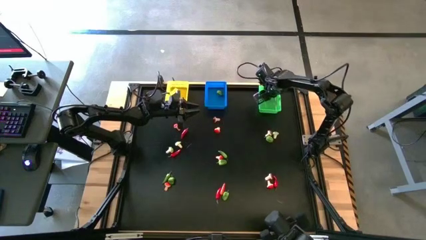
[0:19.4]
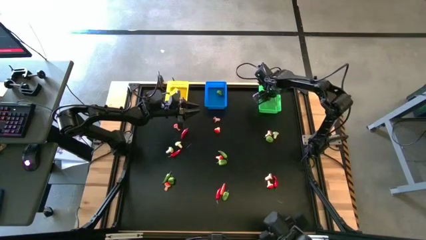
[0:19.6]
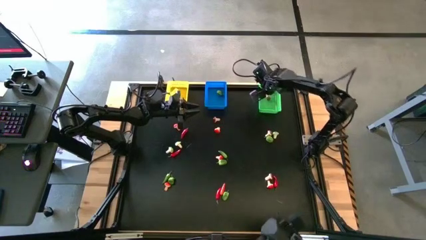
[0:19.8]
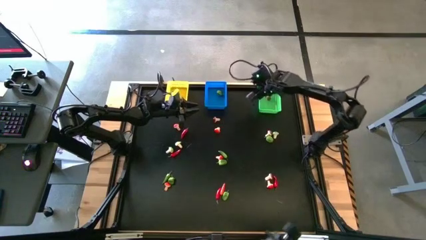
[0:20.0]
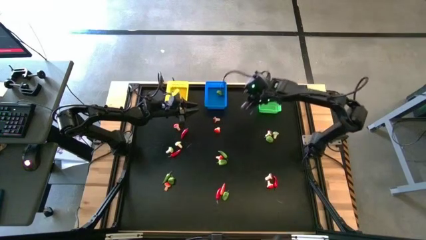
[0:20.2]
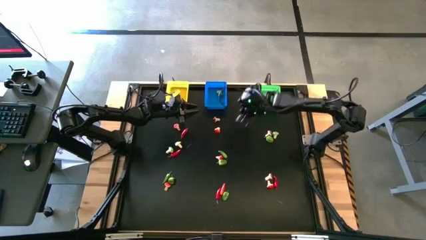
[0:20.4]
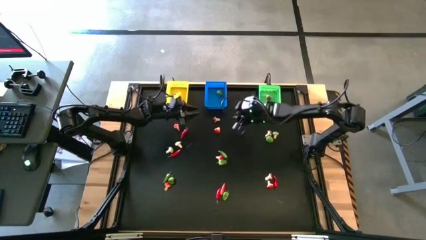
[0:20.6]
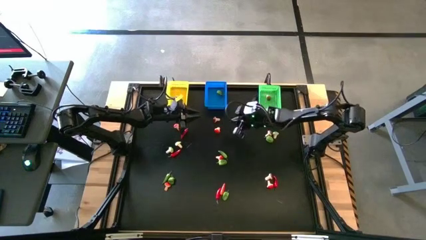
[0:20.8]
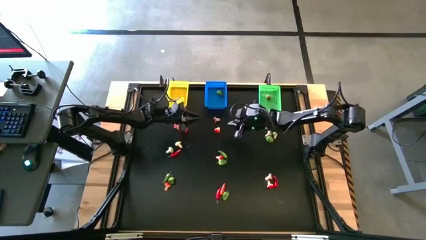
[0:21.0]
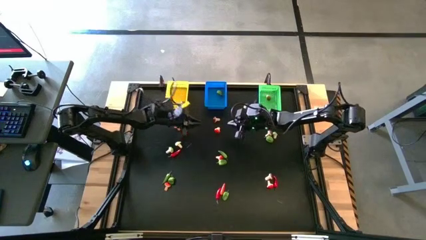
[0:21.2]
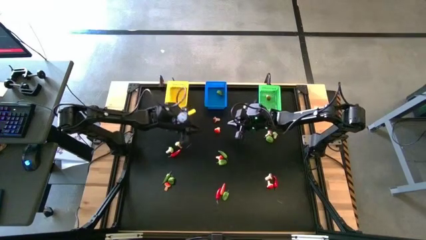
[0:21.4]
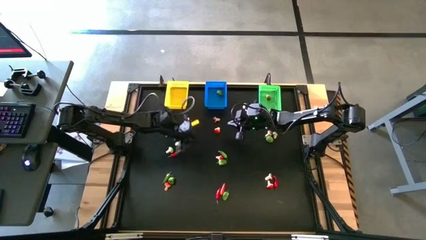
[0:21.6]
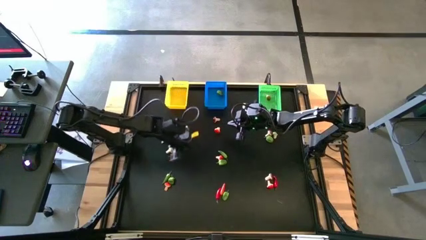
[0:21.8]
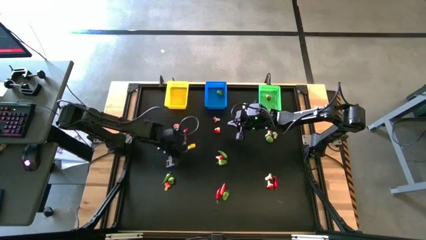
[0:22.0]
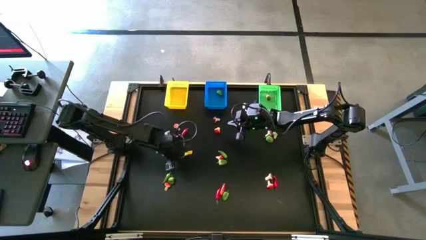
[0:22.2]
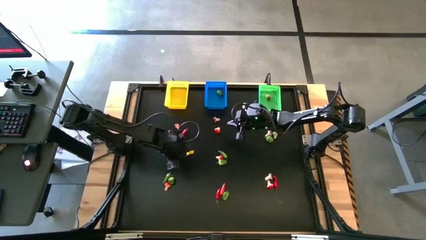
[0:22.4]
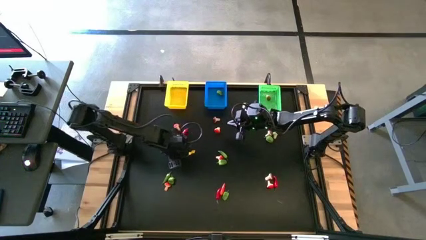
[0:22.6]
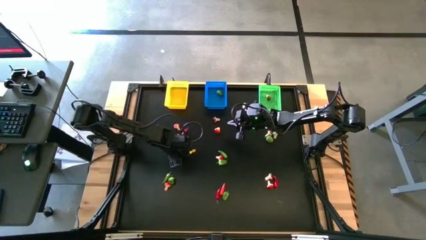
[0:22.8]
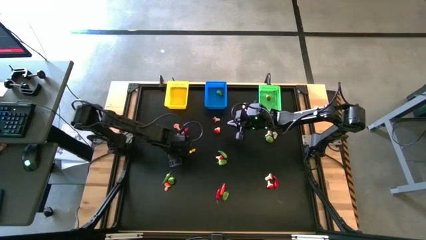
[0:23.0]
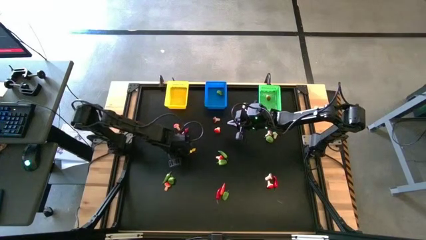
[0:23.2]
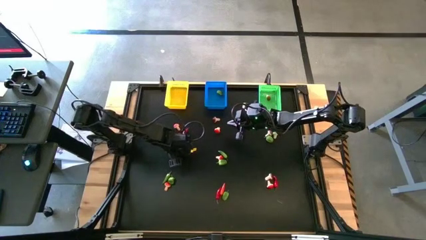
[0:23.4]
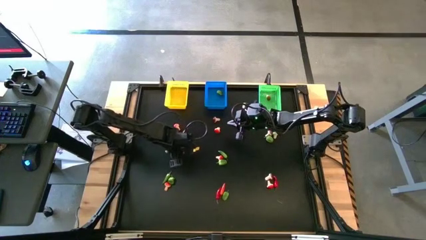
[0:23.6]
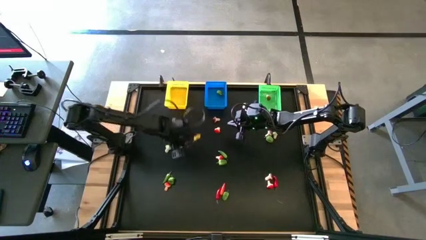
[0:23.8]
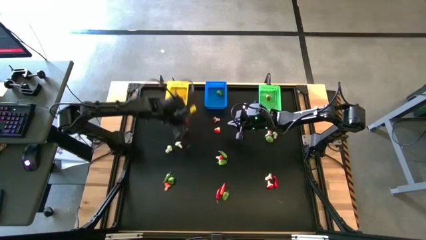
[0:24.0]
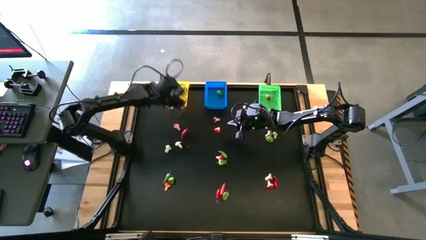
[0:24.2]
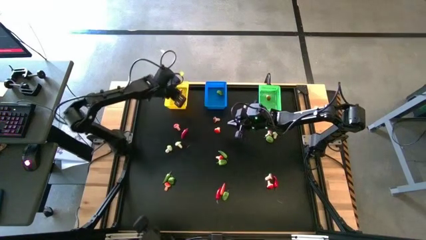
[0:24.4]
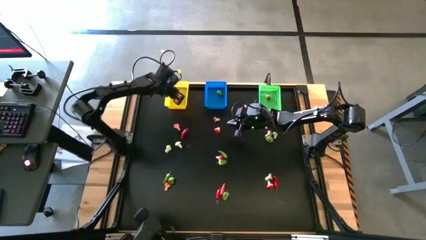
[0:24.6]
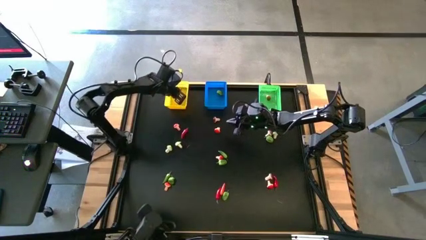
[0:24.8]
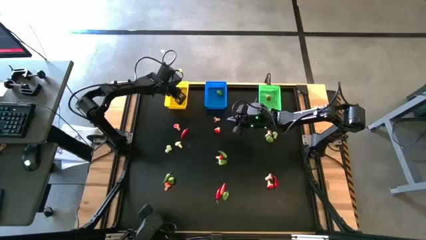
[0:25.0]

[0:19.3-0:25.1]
Task: Sort produce into baskets
Put the red chili into the yellow bin

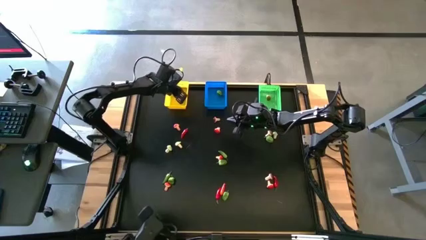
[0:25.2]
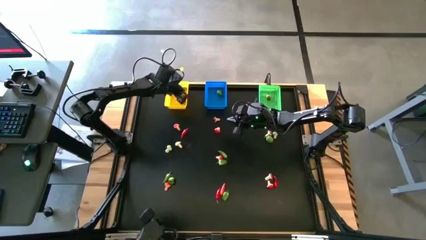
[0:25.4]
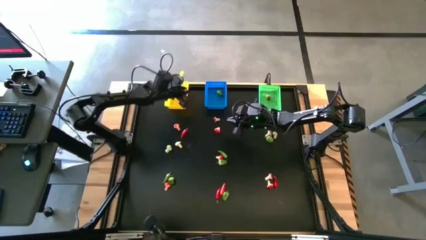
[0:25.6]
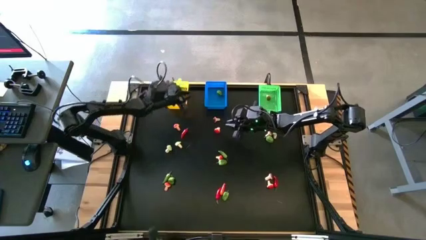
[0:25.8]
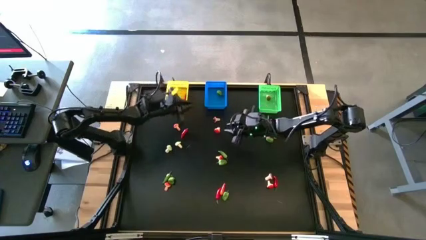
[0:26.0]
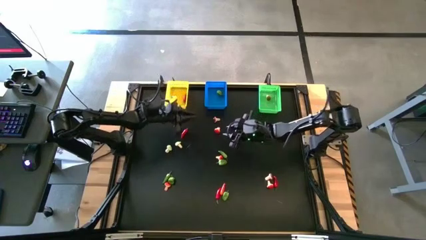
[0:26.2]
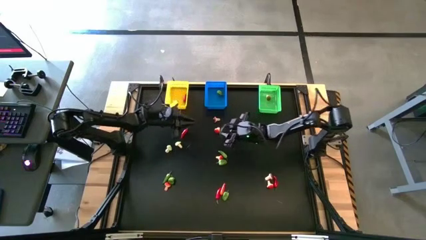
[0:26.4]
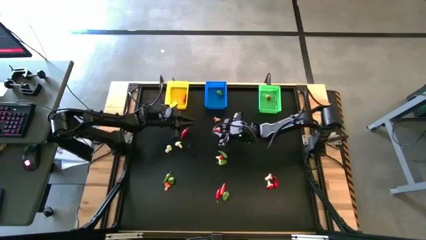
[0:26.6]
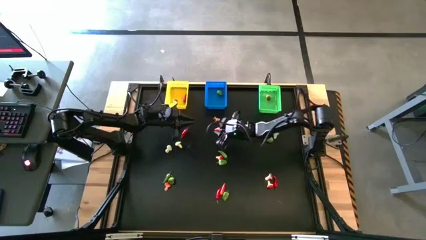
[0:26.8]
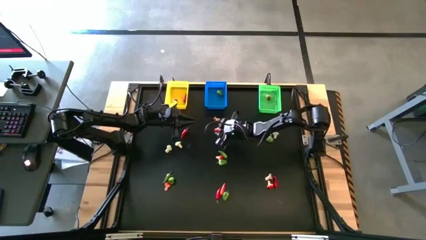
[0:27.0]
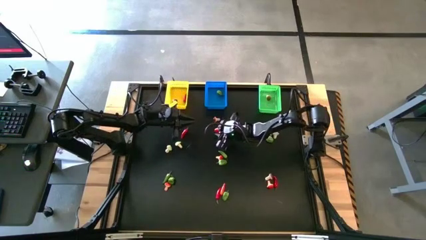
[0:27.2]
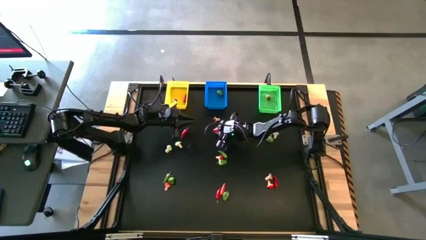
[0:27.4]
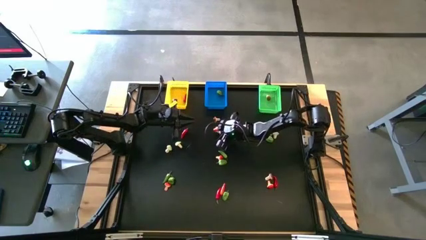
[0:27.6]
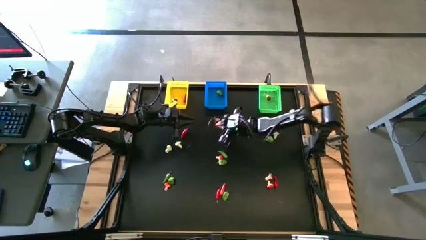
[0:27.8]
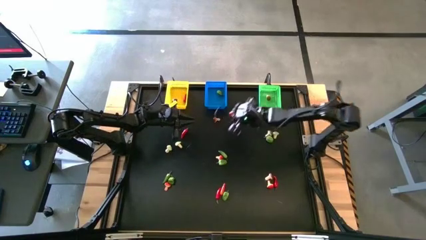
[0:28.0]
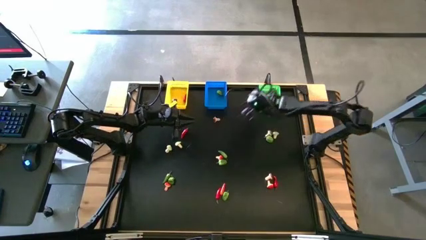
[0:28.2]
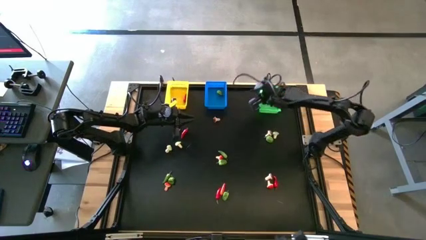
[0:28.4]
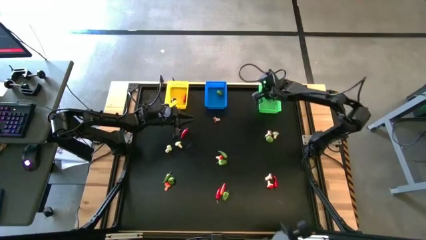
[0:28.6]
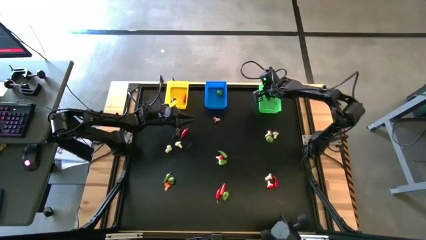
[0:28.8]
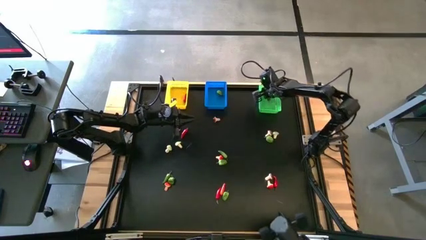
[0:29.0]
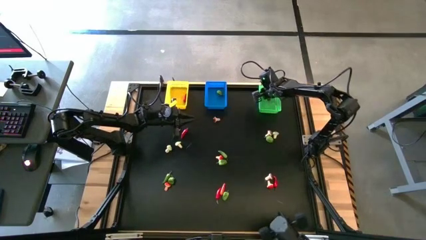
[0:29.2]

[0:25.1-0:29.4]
Put the orange mushroom into the green bin

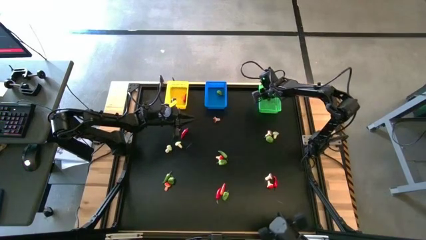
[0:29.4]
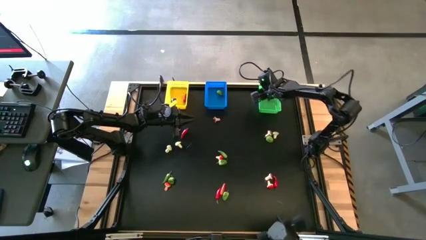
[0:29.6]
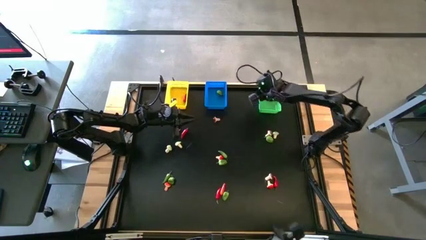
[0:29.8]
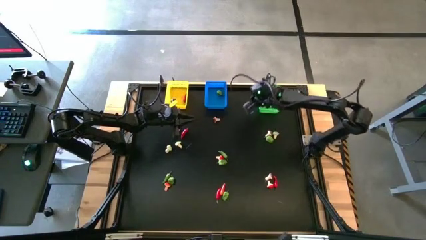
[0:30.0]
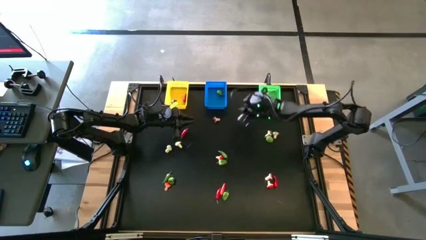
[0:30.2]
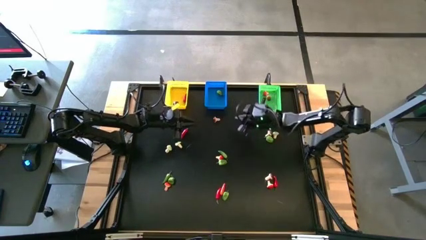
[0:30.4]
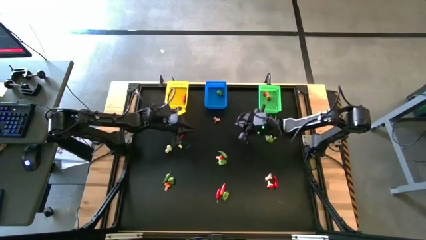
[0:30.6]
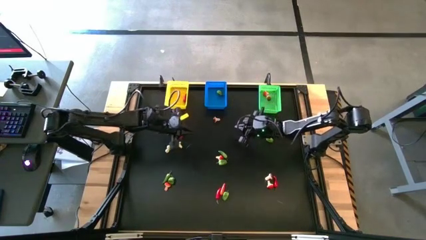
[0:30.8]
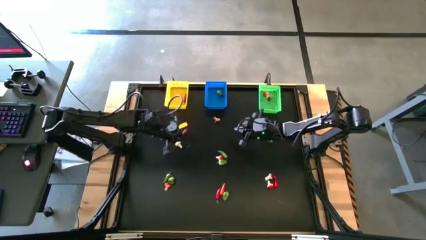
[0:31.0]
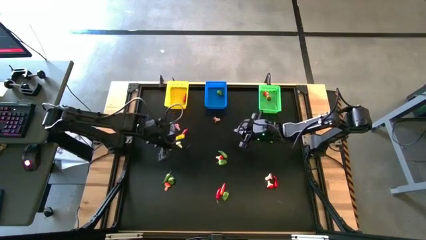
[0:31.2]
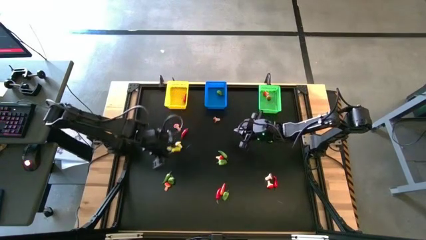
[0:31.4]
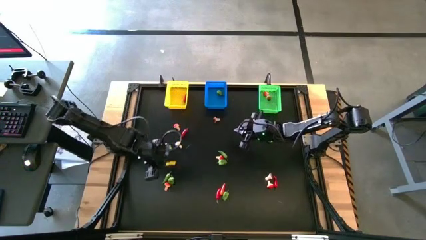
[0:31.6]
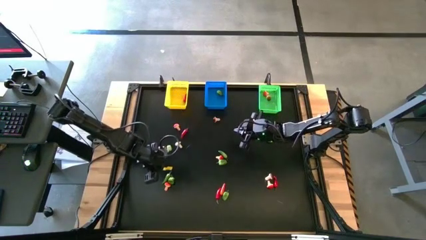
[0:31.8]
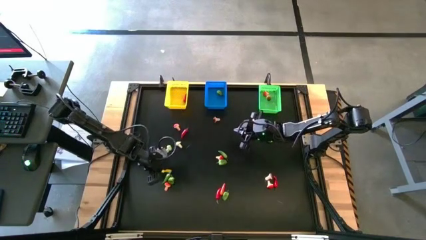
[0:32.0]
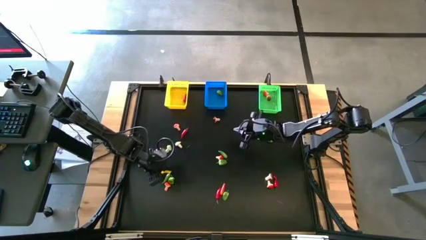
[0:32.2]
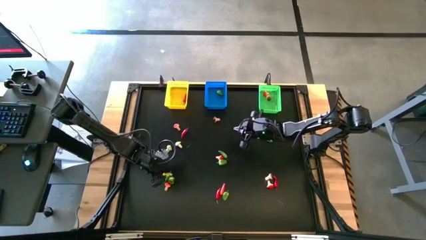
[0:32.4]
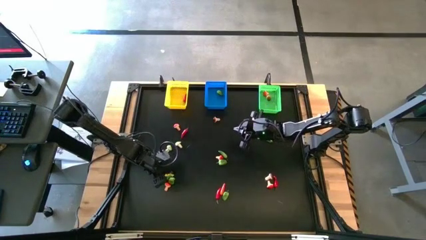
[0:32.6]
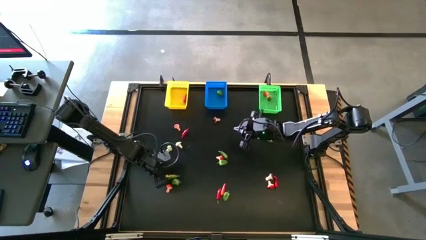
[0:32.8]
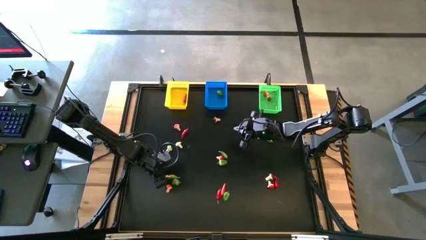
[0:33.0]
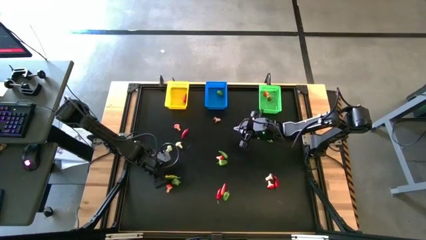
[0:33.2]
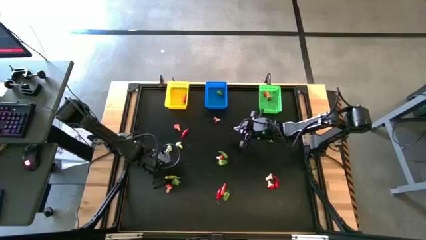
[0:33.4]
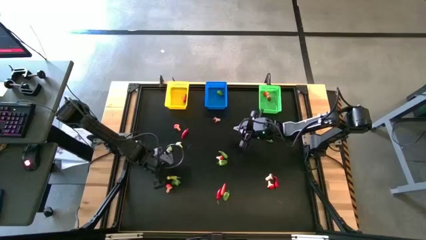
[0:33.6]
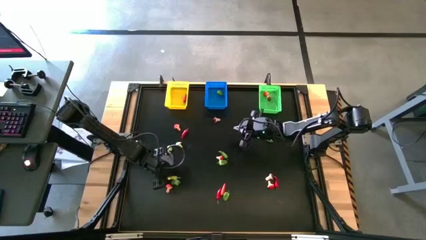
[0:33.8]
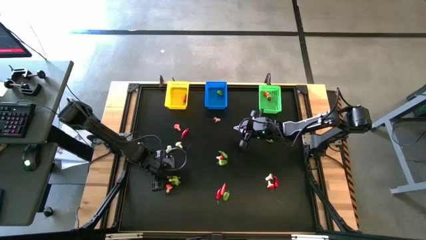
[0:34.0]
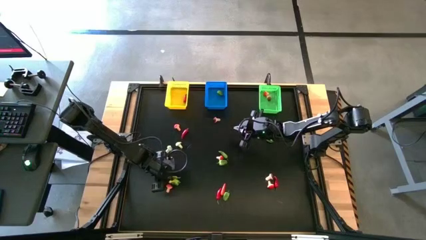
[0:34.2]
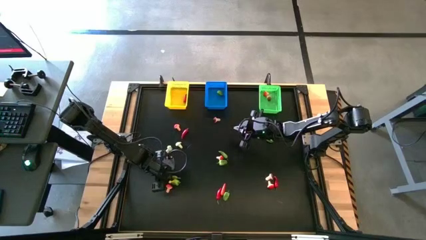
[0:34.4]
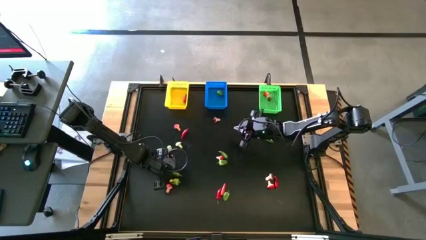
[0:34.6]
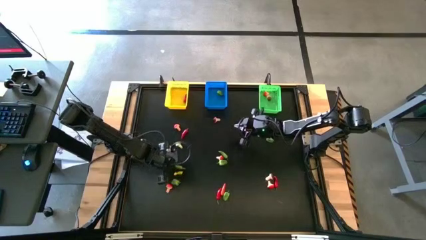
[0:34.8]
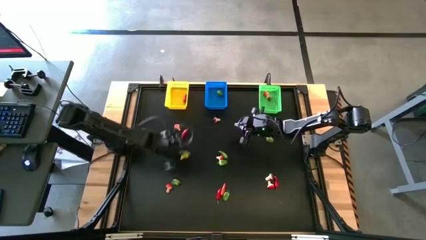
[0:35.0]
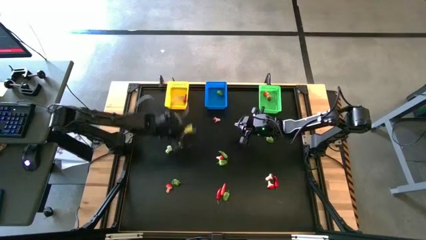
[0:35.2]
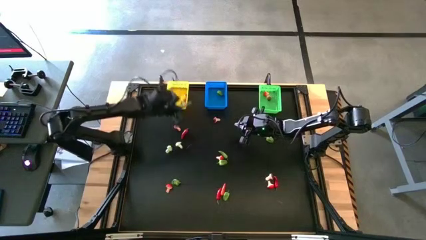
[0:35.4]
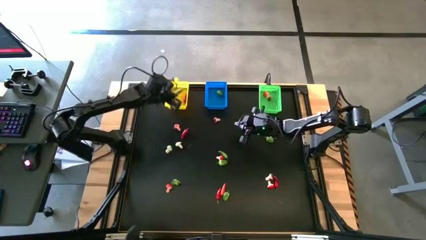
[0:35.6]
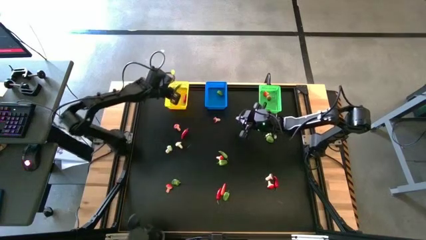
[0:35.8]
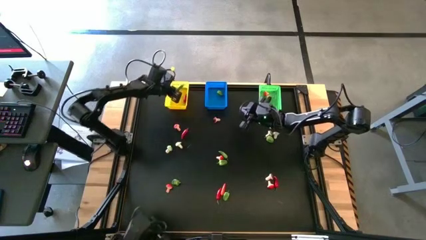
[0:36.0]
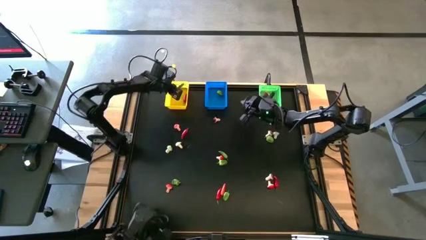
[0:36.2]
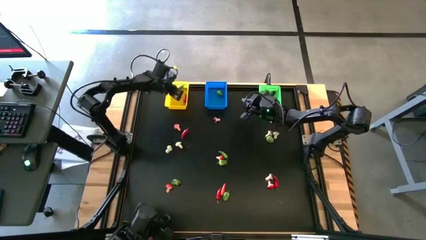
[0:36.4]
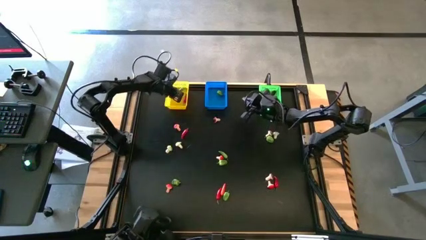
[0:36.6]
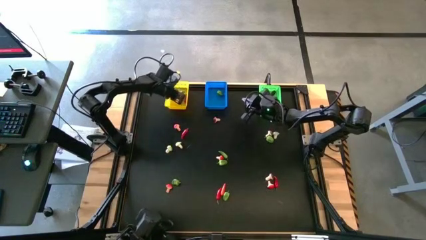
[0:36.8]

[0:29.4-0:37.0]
Put the green chili pepper into the yellow bin
